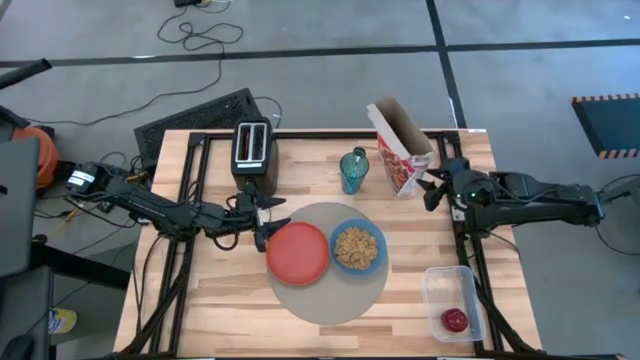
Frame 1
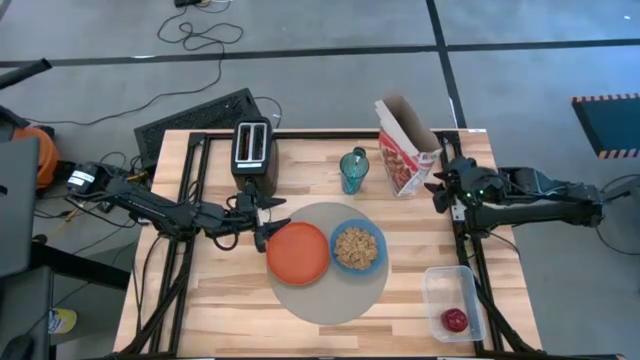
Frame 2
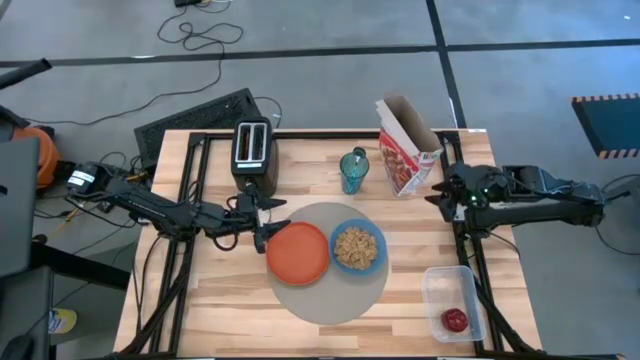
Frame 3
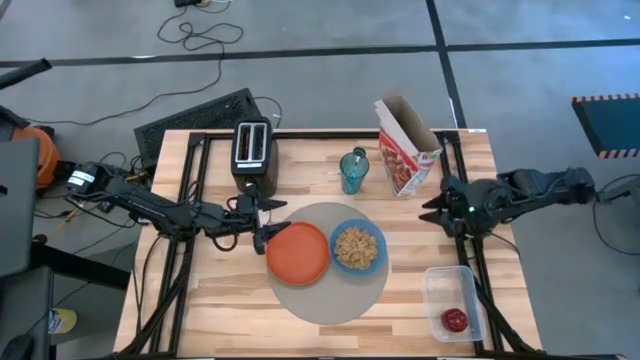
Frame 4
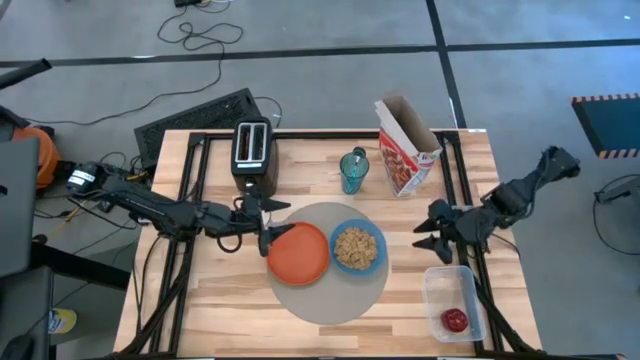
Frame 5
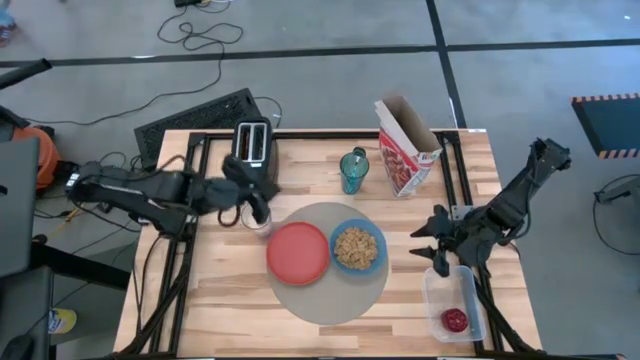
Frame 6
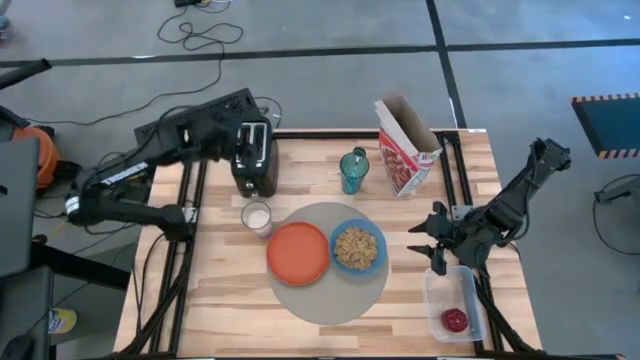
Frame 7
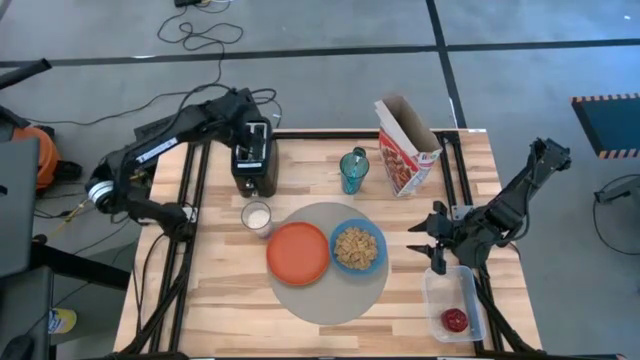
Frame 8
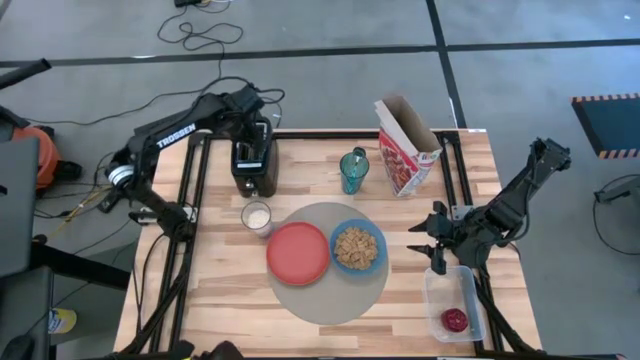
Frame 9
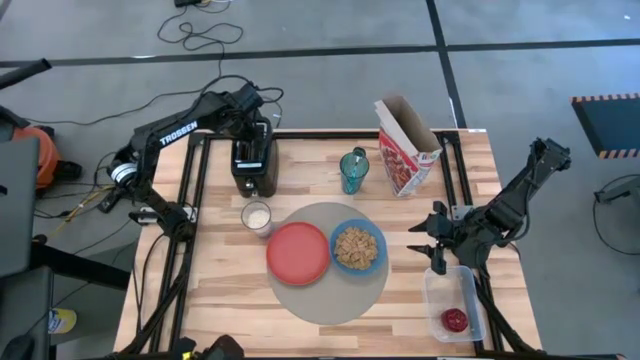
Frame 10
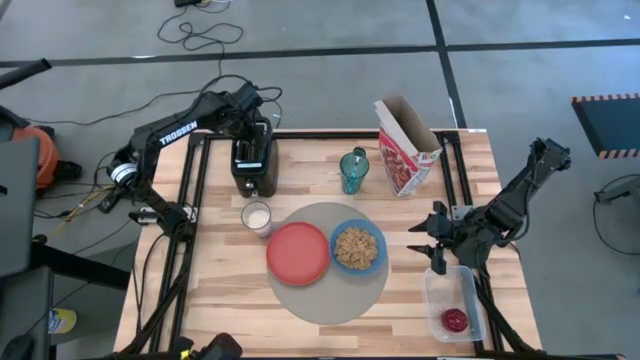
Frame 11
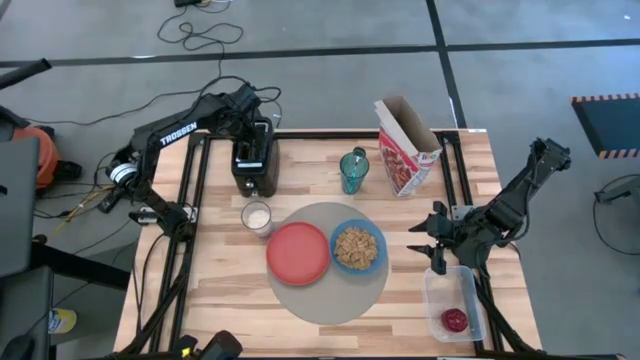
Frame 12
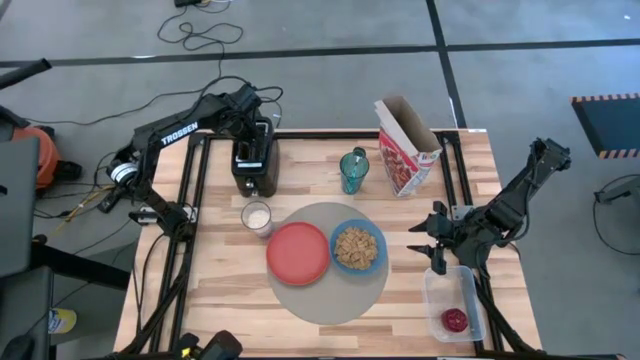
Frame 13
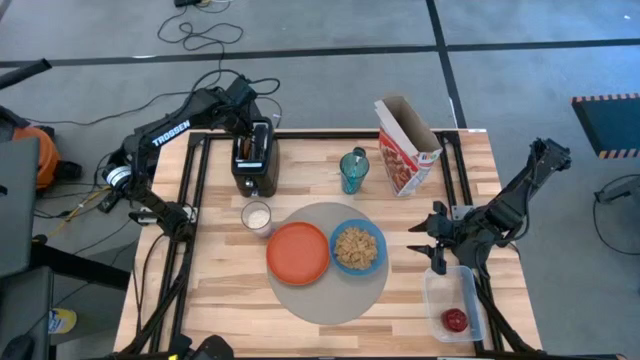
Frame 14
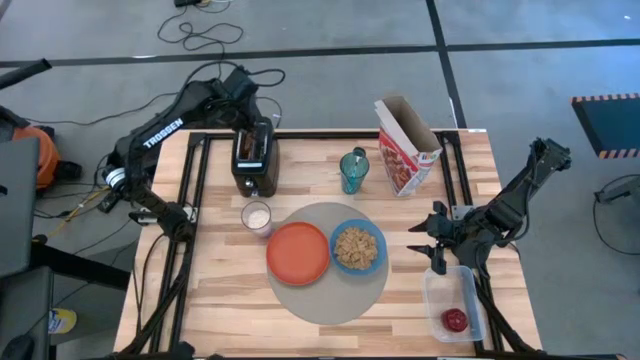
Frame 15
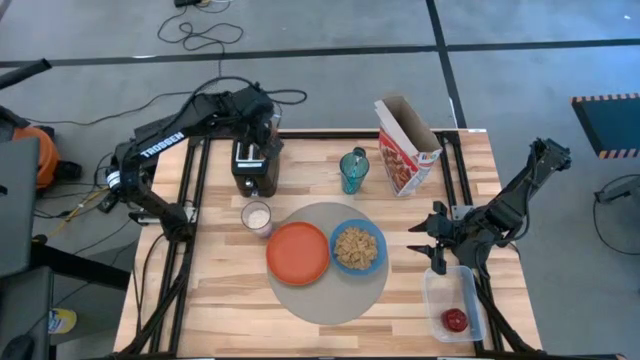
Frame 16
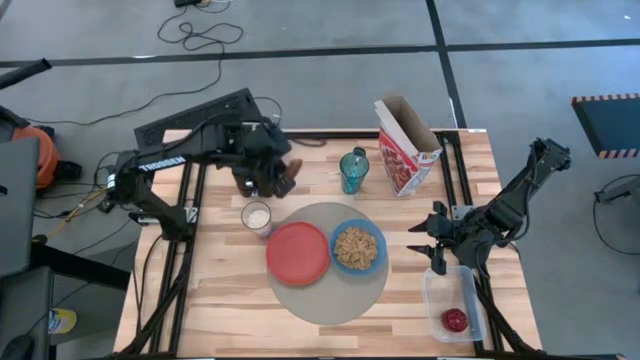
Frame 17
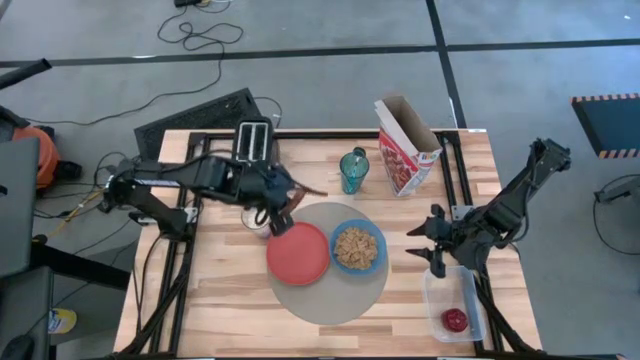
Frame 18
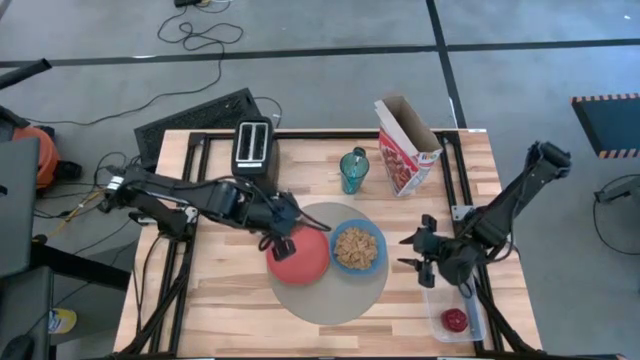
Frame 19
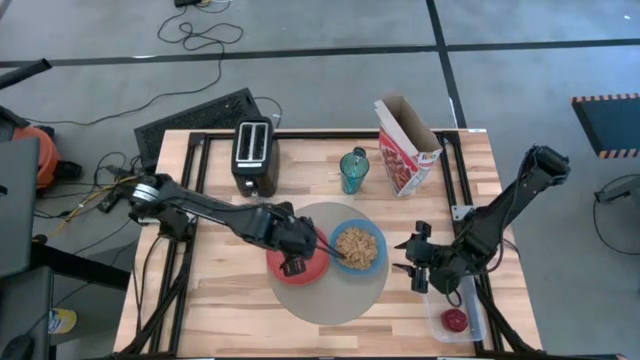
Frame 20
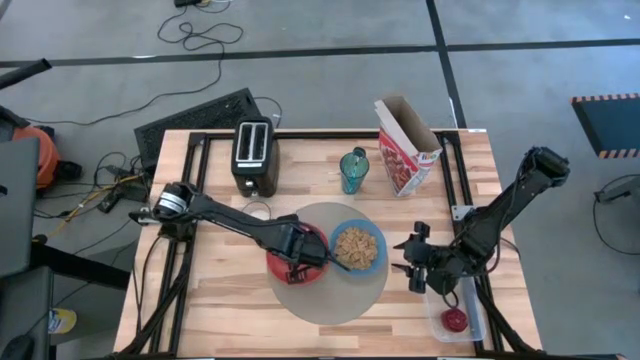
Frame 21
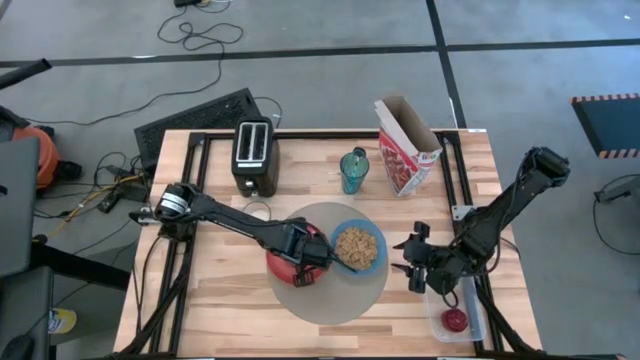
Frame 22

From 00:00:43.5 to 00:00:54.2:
Task: Arrange a breakfast setting
Put the toasted bread on the plate

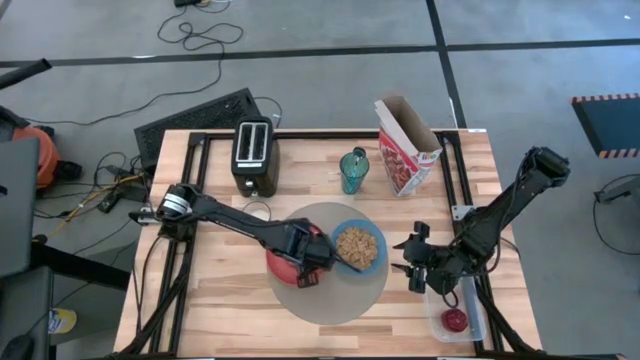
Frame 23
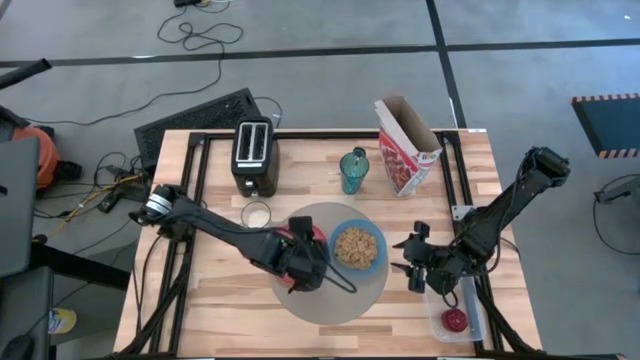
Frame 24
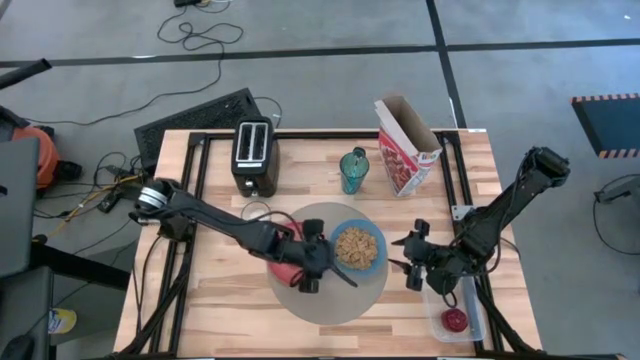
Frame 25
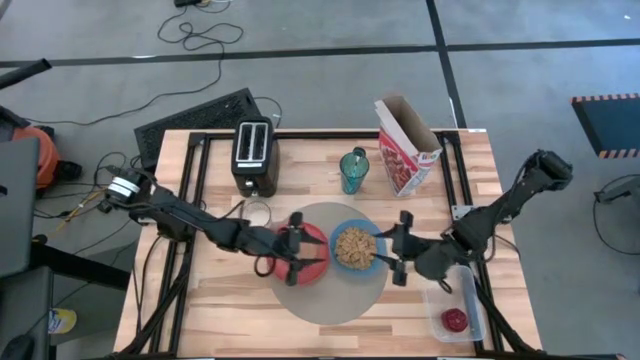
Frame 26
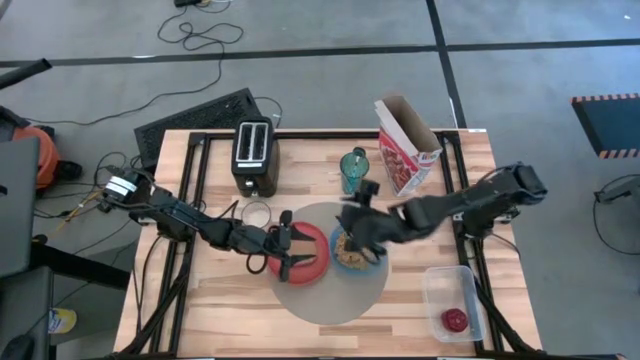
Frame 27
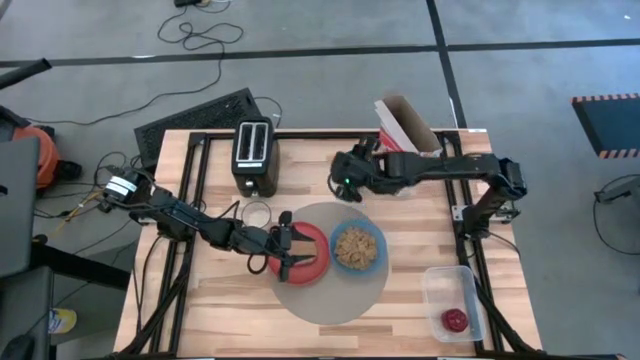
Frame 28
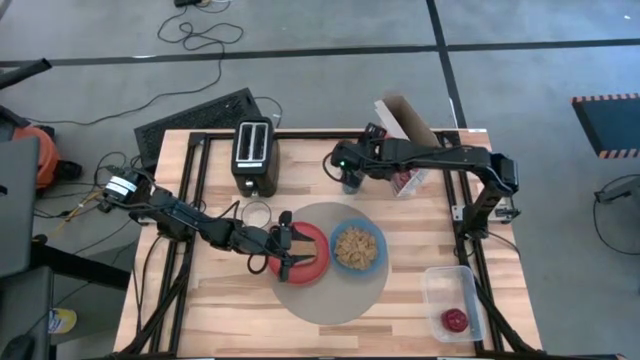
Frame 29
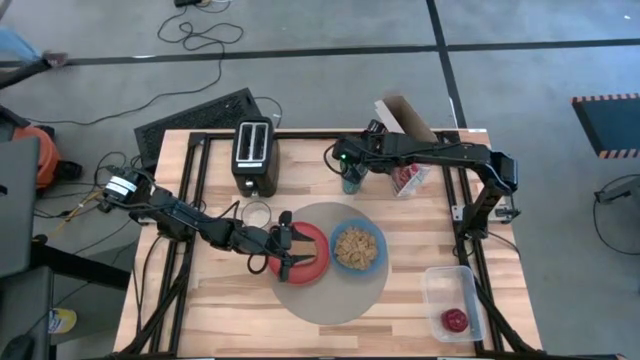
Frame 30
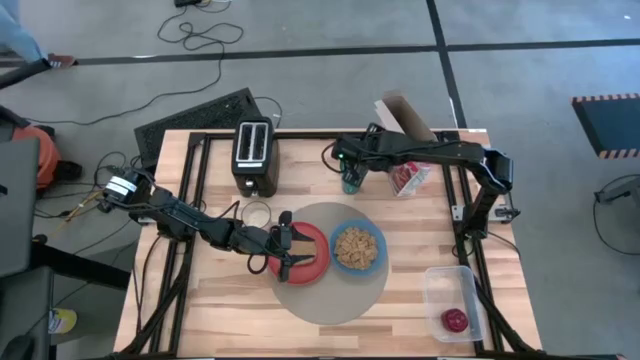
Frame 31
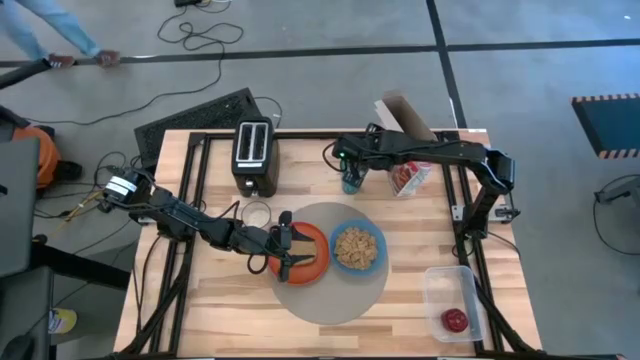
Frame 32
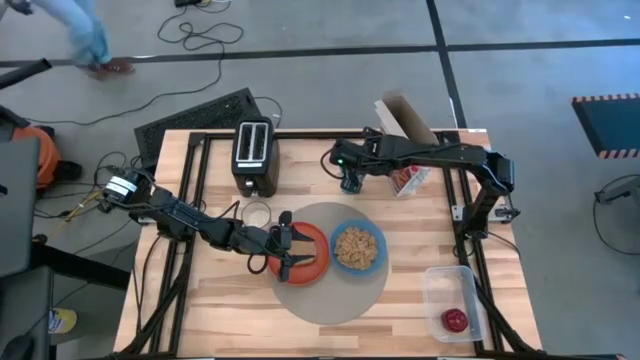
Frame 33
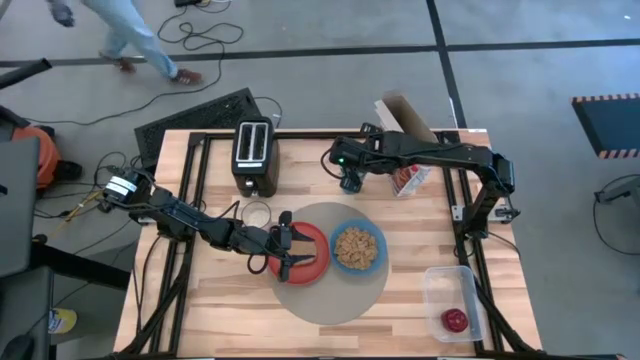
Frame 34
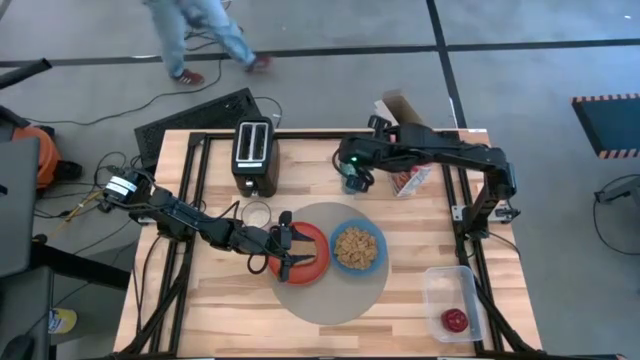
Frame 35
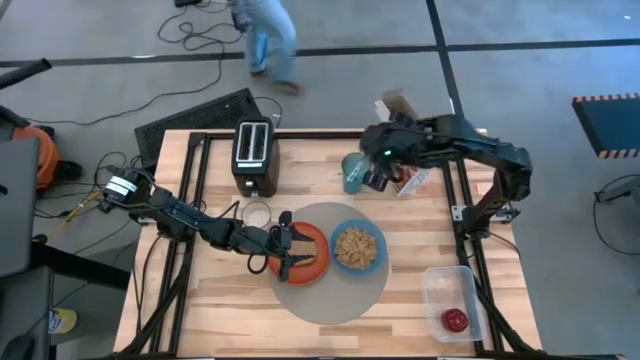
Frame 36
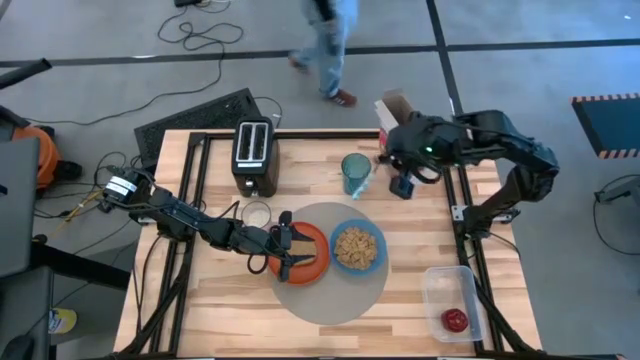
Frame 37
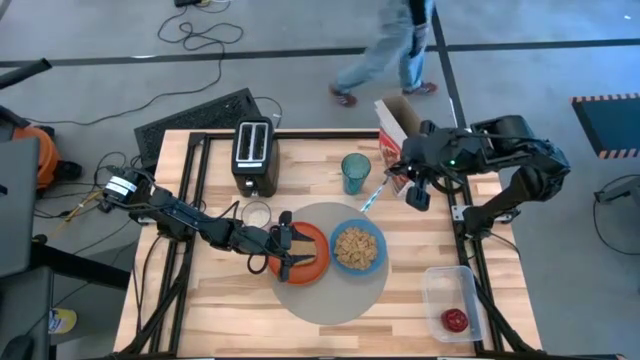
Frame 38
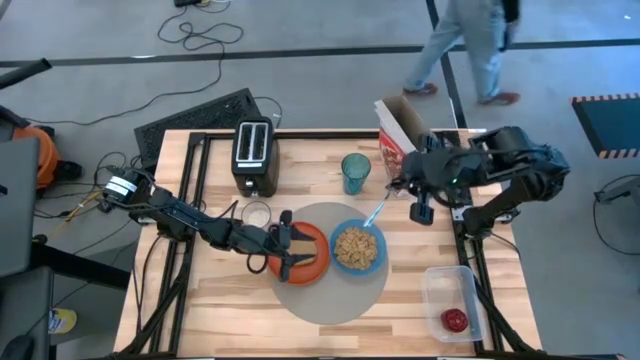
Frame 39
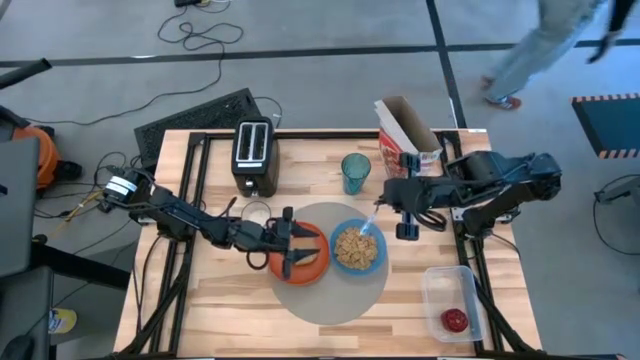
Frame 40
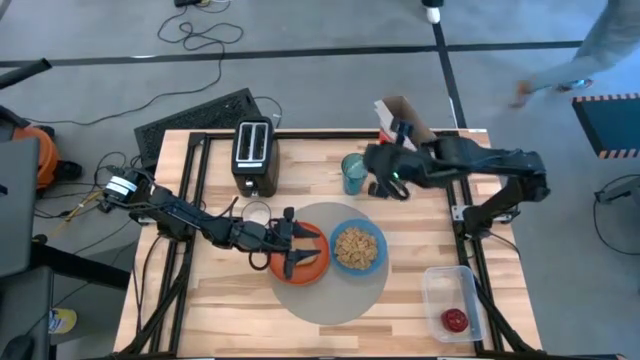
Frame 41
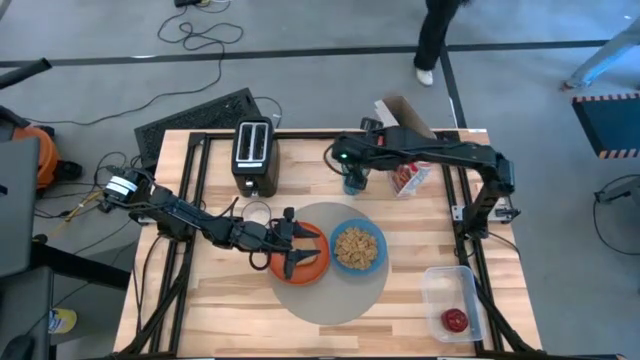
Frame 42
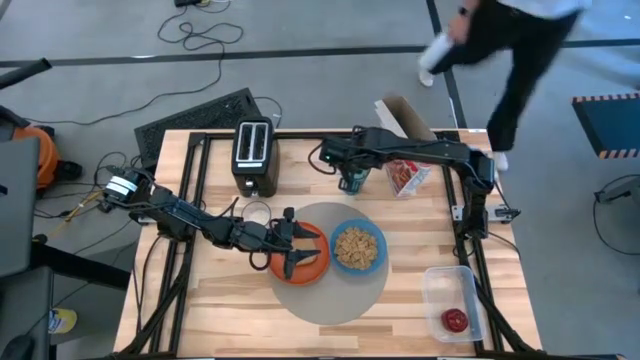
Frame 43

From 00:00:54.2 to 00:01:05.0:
Move the spoon to the right of the placemat
